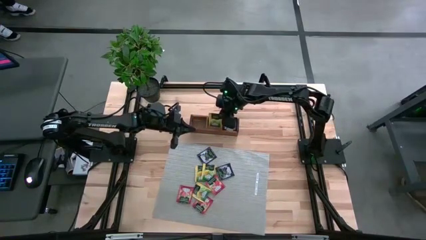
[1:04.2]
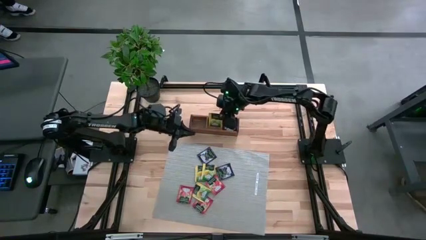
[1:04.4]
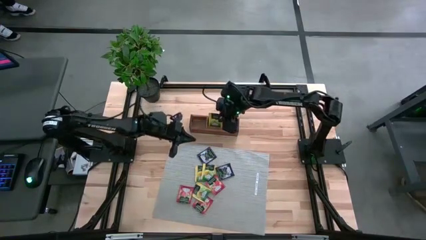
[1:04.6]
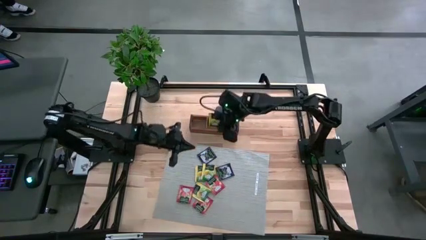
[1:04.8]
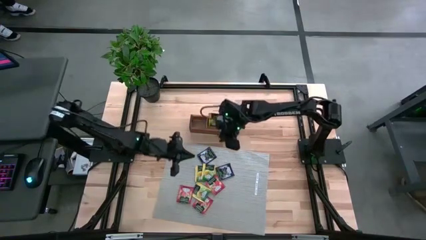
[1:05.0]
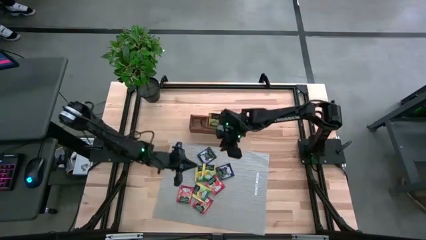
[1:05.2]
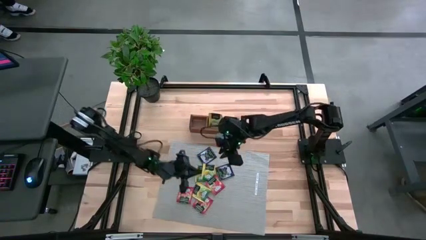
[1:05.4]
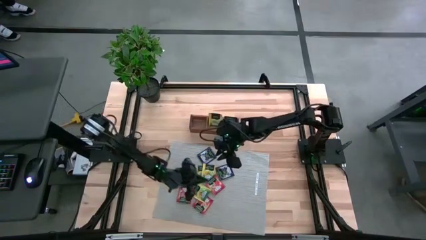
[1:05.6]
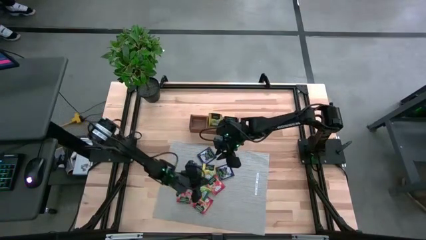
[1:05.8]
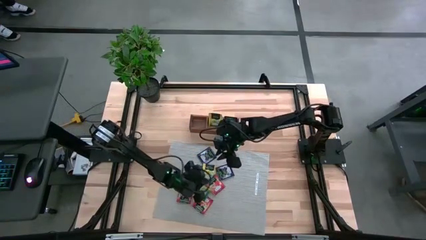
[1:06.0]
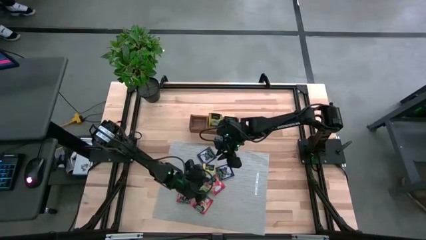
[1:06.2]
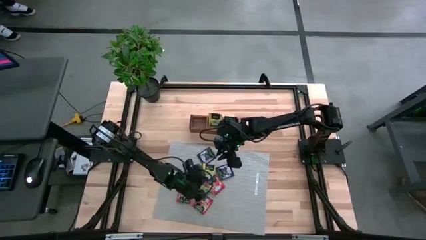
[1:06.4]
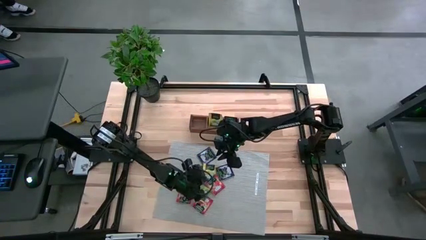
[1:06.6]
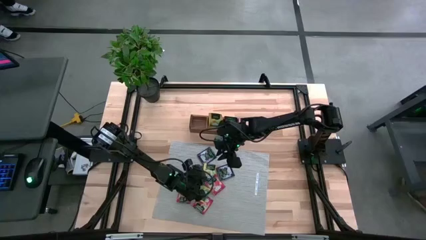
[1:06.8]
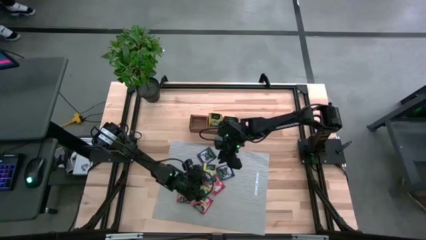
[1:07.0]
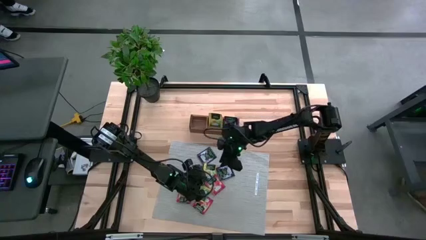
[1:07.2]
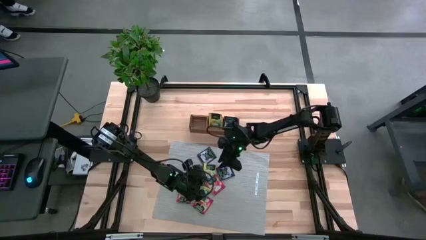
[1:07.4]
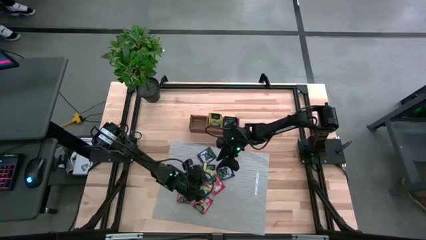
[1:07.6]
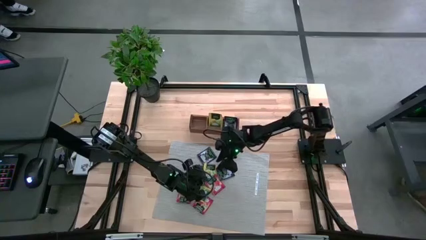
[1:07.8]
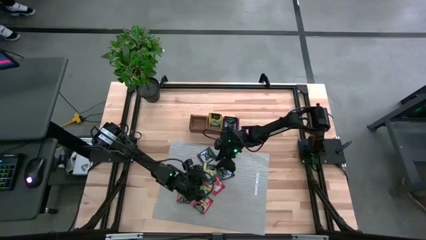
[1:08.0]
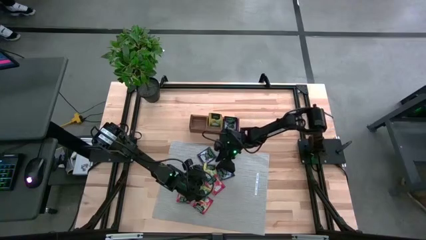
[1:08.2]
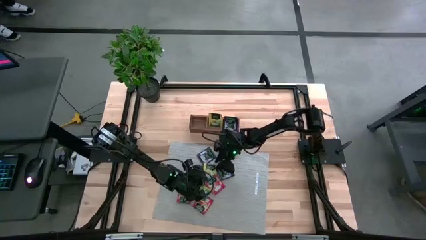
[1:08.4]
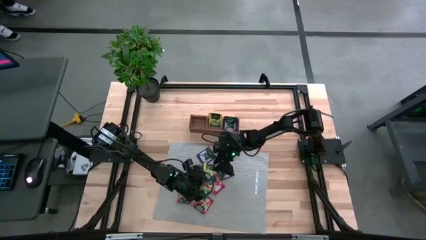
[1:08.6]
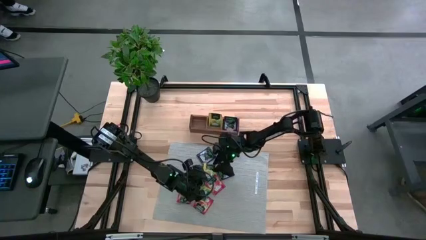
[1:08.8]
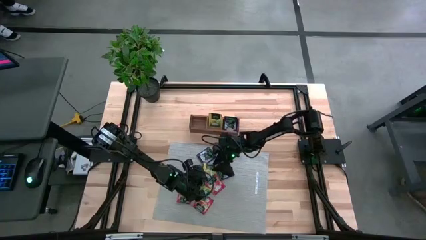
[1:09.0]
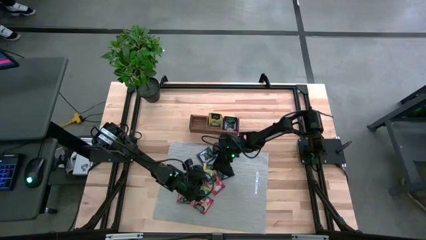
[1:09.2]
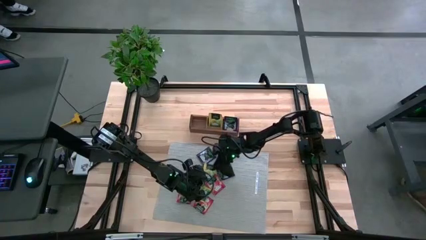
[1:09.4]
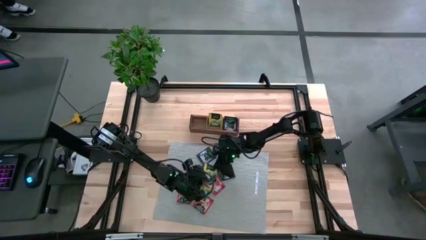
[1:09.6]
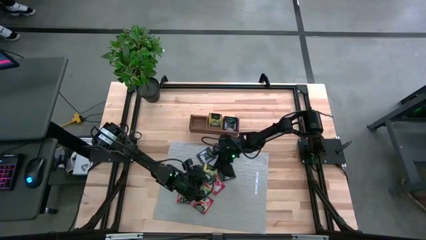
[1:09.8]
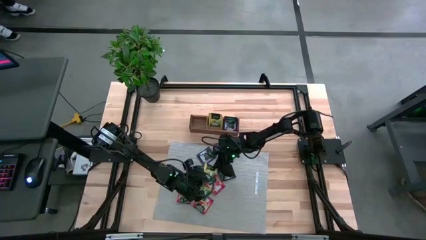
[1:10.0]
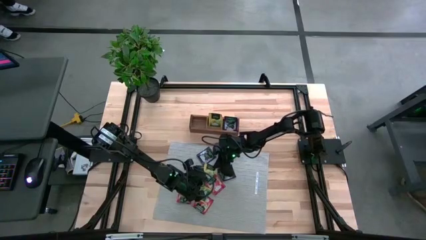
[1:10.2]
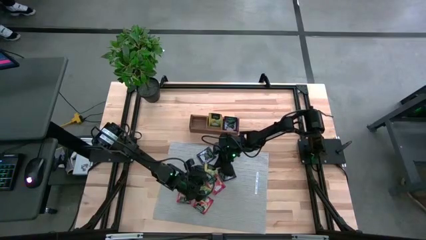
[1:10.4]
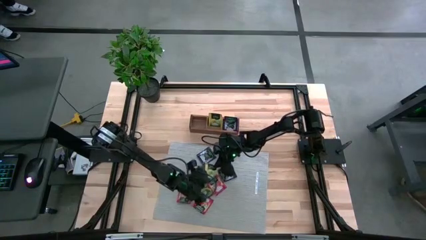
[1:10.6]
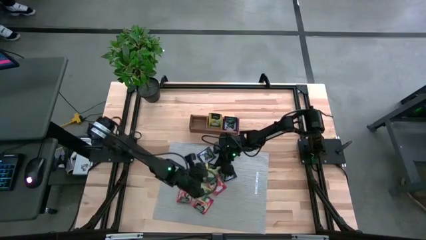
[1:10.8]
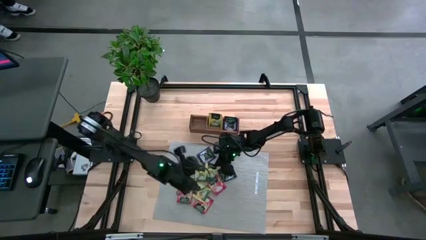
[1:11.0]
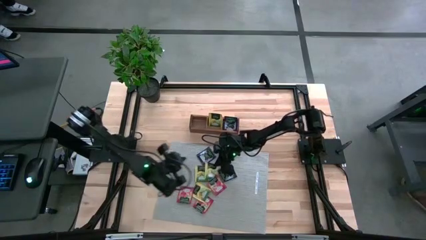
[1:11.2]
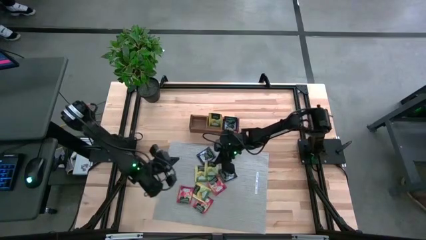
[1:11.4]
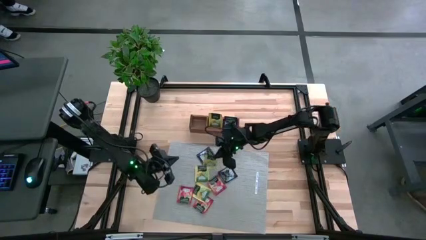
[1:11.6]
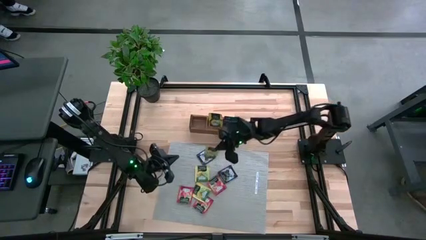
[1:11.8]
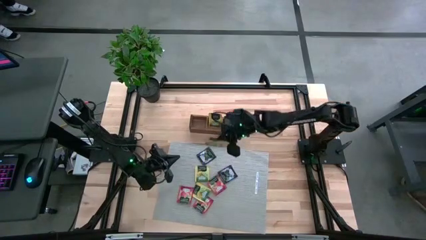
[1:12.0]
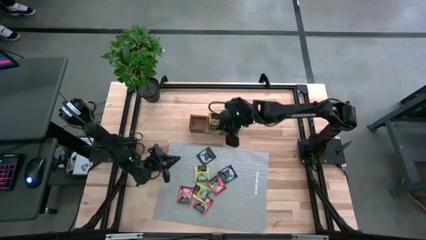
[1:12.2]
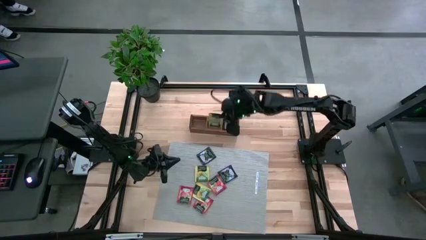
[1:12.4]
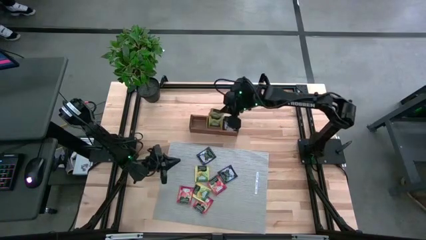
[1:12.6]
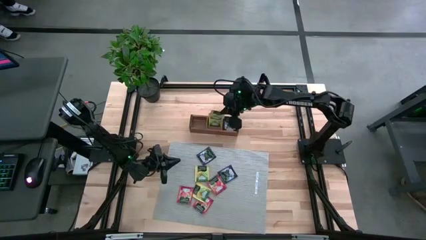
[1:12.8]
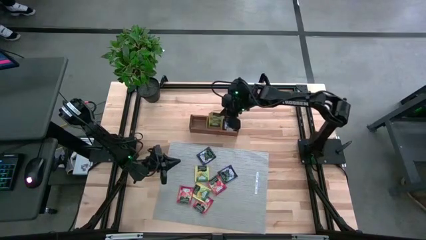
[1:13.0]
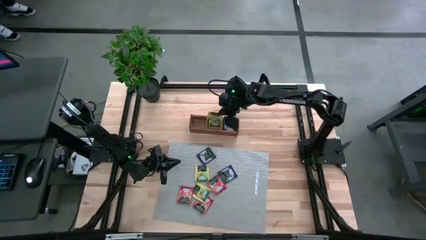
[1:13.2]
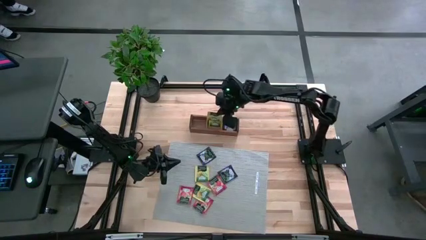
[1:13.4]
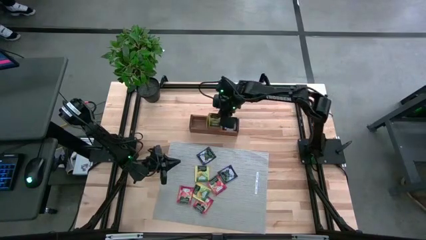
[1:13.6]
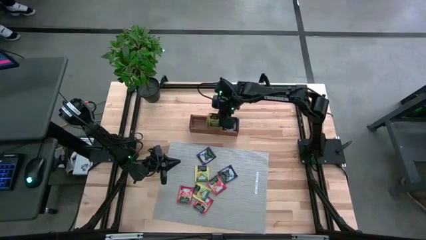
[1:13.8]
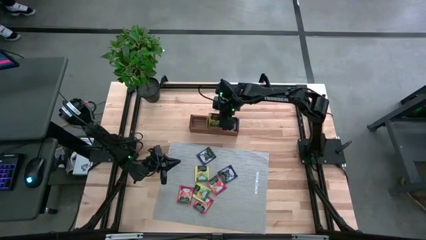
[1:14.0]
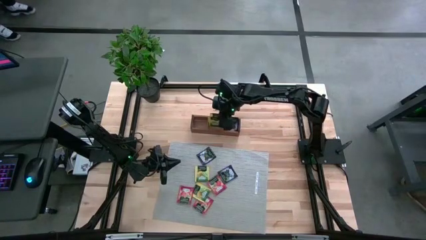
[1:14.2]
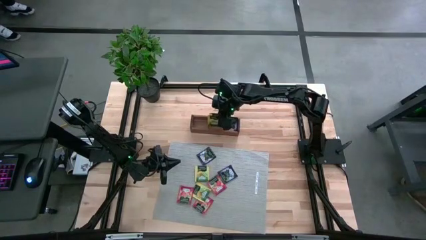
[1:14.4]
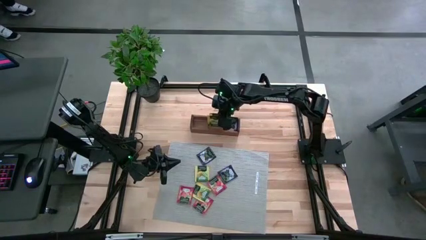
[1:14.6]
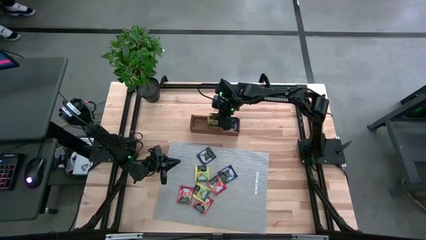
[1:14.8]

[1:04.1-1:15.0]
Task: Pick & Place Tea
Put the yellow tea bag into the middle section of the wooden organizer

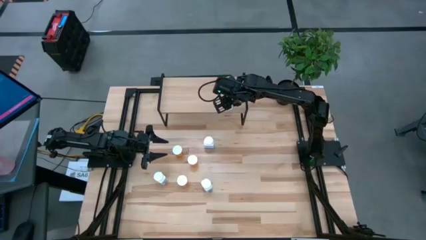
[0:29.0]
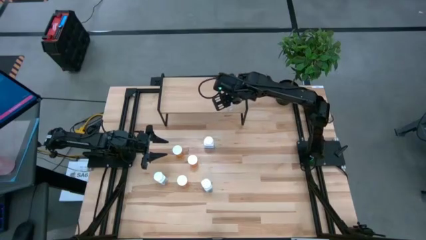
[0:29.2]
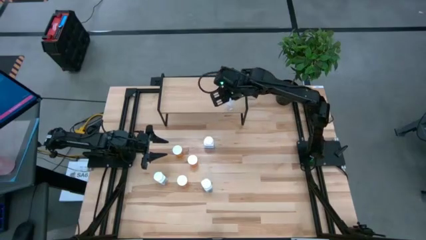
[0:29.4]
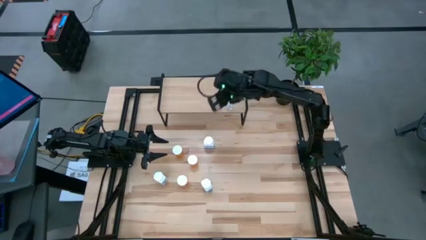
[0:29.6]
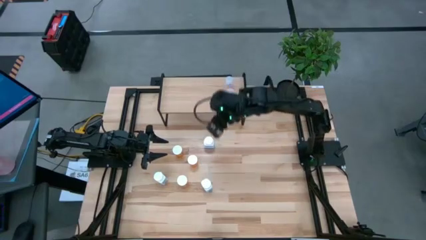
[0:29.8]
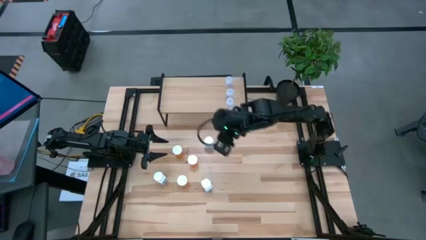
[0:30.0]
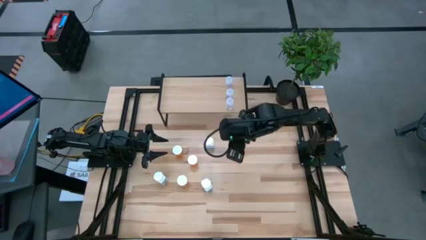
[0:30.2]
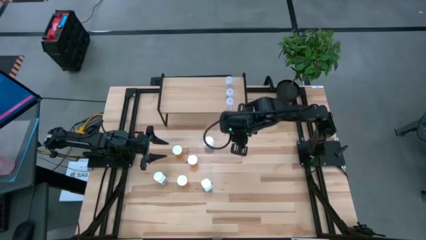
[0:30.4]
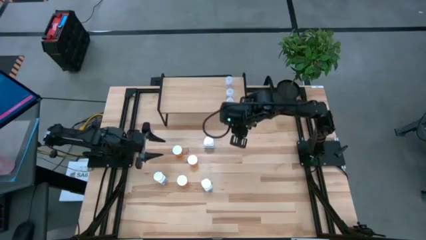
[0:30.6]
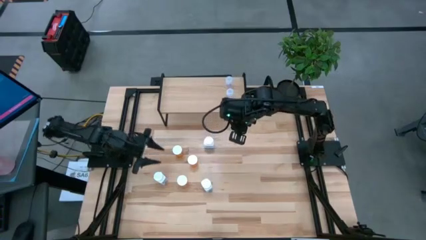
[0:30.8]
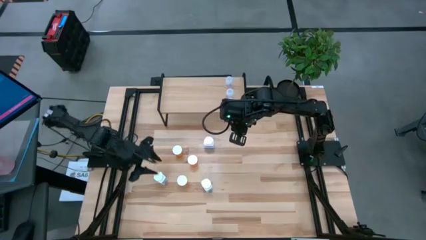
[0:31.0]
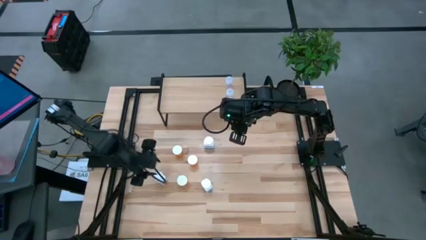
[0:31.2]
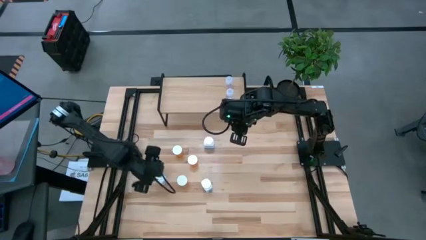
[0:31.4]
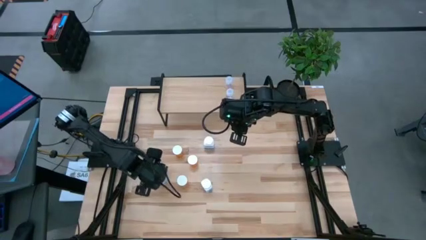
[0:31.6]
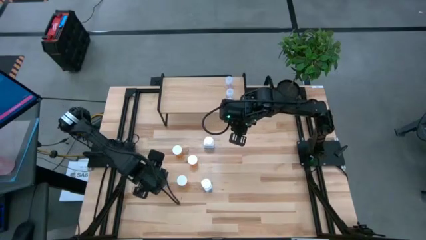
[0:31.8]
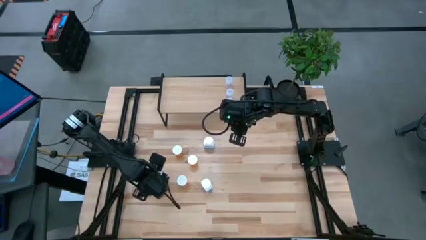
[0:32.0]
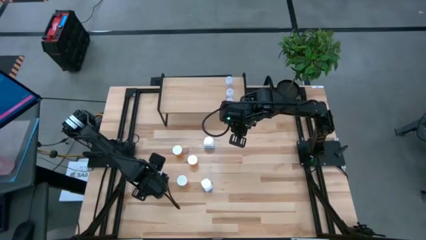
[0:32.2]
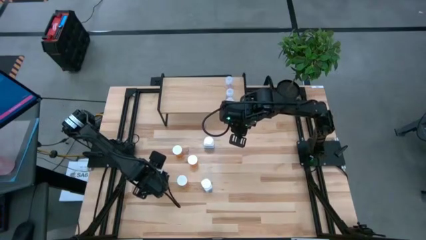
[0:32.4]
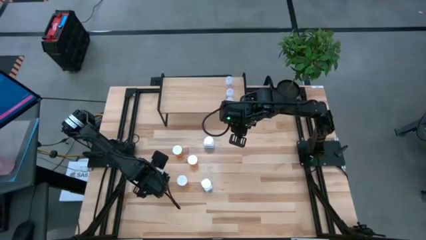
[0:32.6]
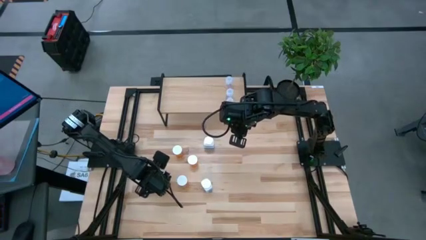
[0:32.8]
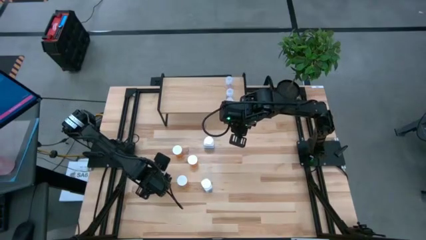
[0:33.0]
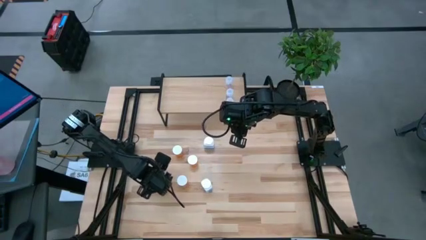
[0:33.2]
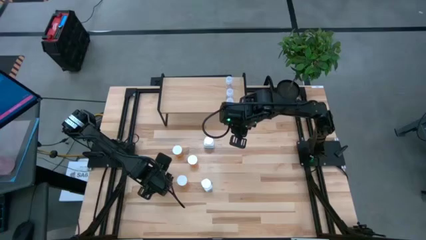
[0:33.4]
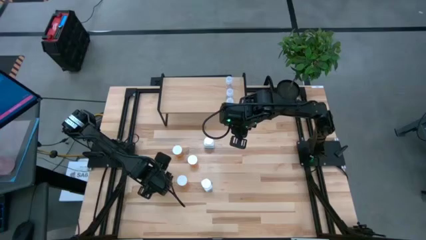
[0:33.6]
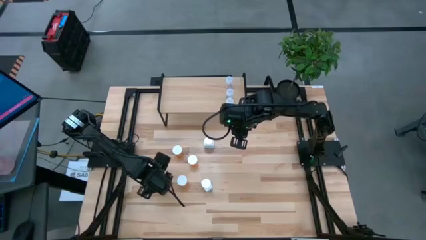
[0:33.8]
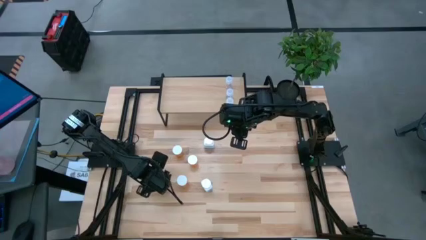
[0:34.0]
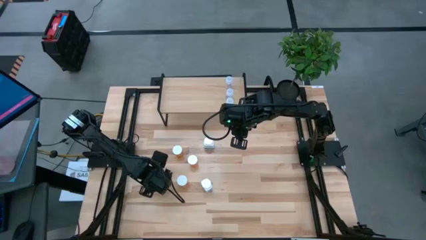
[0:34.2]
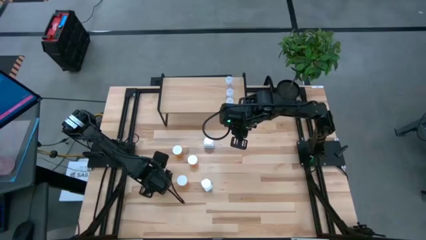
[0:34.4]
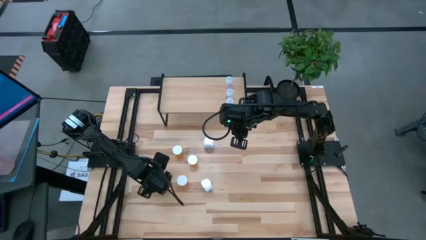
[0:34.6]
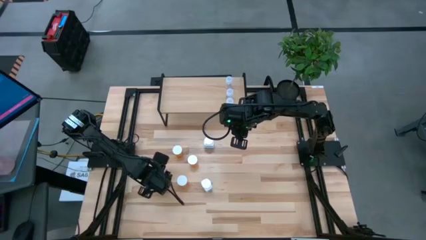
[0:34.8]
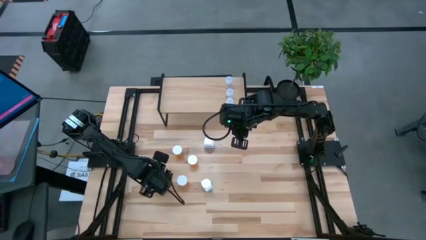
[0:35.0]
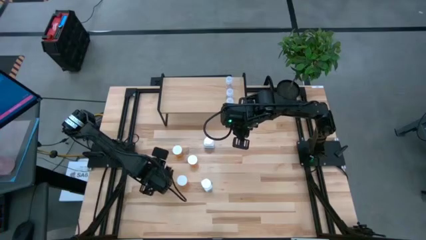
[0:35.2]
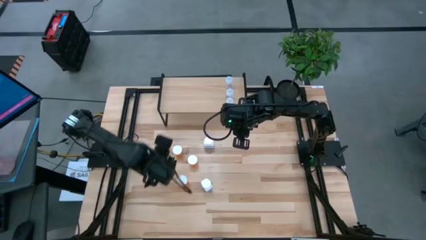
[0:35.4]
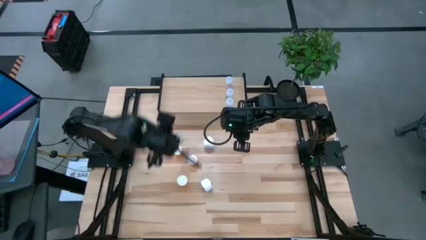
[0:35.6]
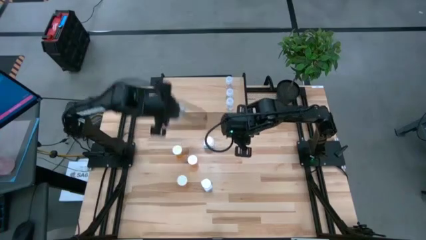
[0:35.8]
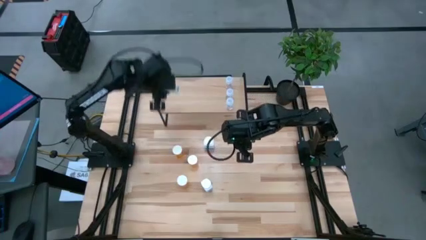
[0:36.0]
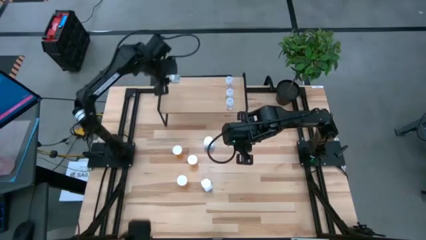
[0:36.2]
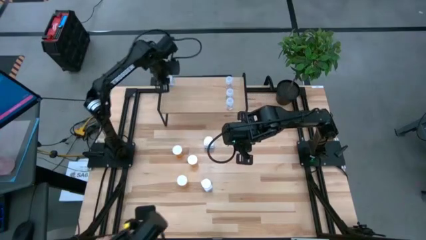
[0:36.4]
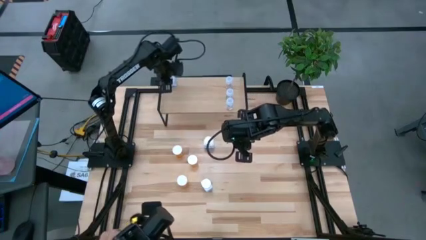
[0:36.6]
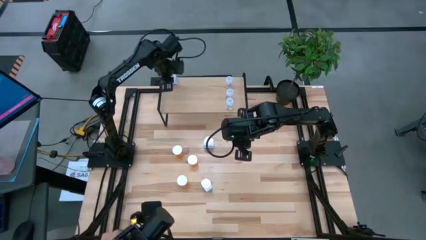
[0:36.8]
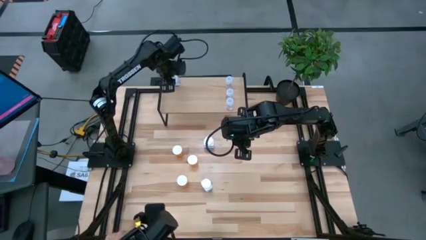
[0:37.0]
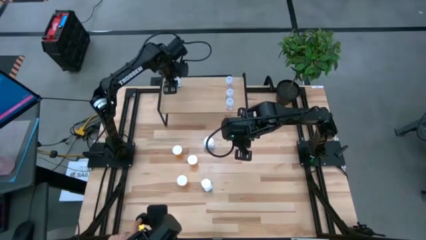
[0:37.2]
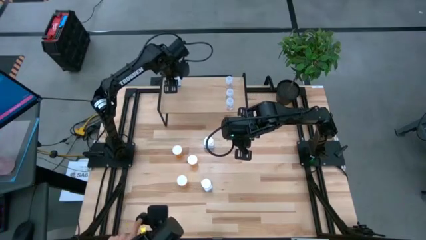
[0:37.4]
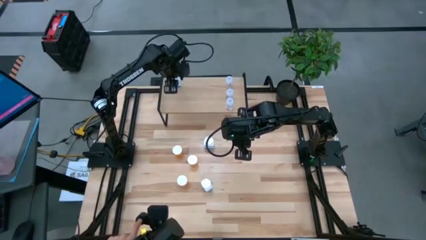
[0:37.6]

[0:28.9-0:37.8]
Task: Pick and place medicine bottles onto shelf by color
Put the bottom left white pill bottle on the shelf
